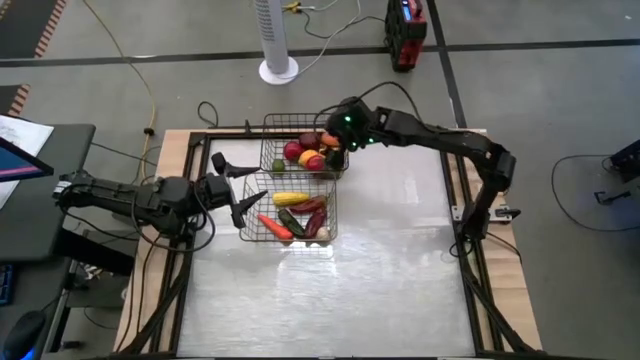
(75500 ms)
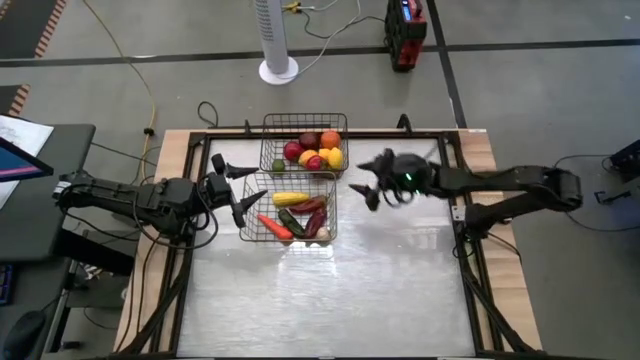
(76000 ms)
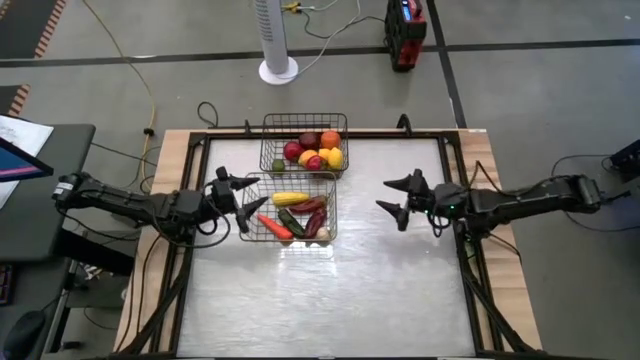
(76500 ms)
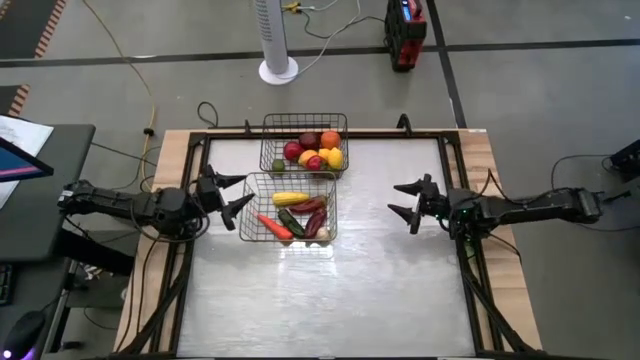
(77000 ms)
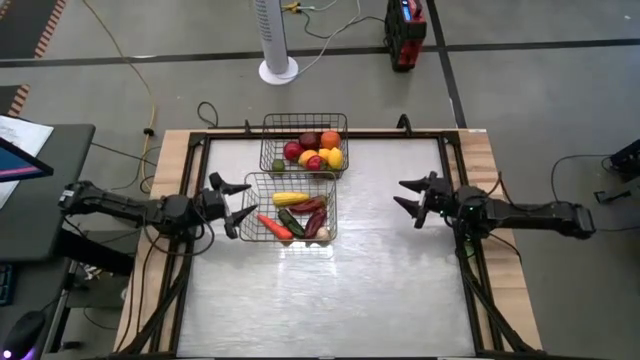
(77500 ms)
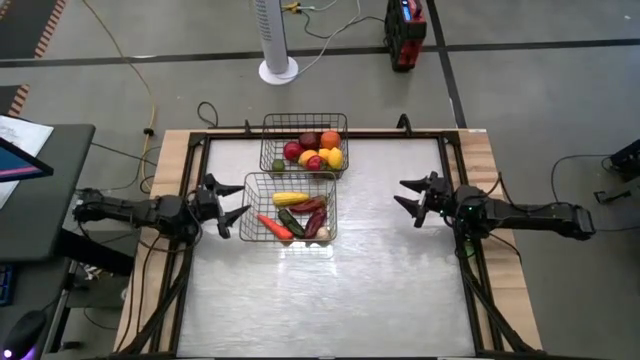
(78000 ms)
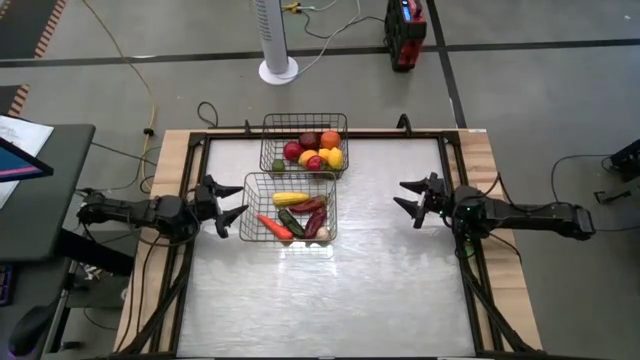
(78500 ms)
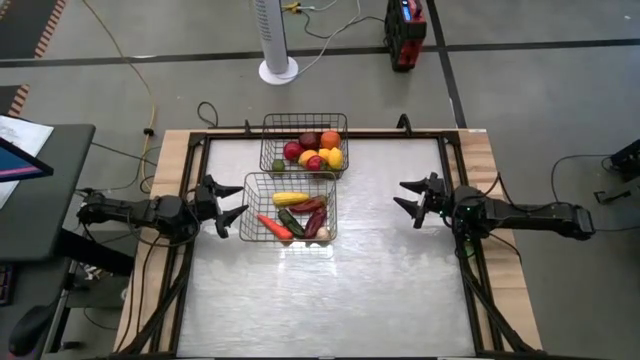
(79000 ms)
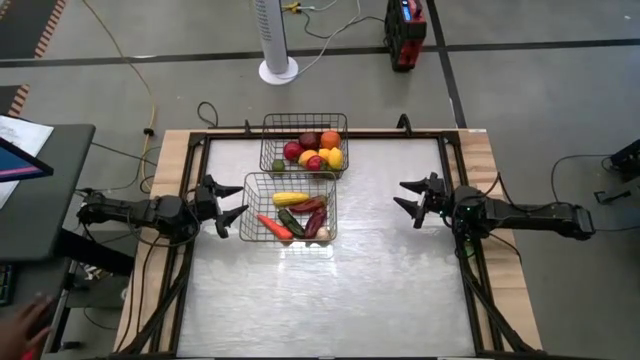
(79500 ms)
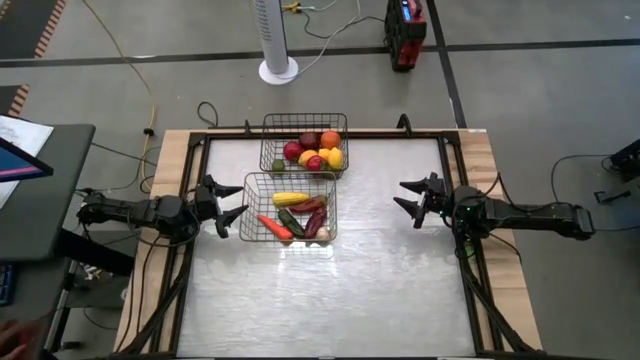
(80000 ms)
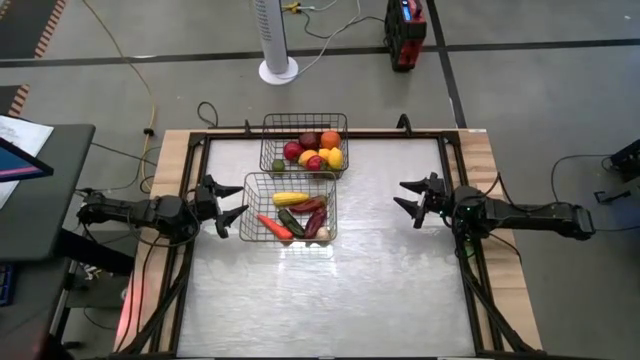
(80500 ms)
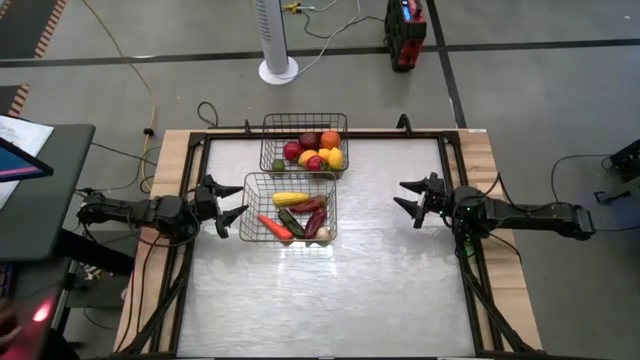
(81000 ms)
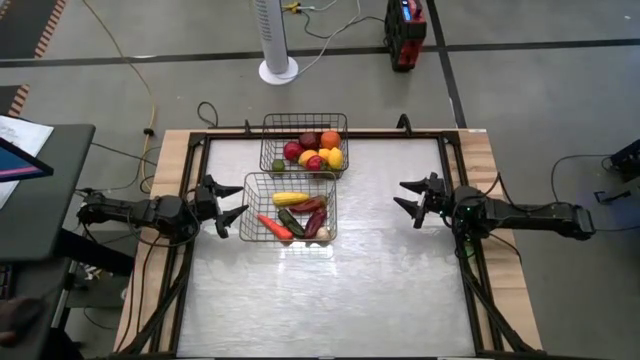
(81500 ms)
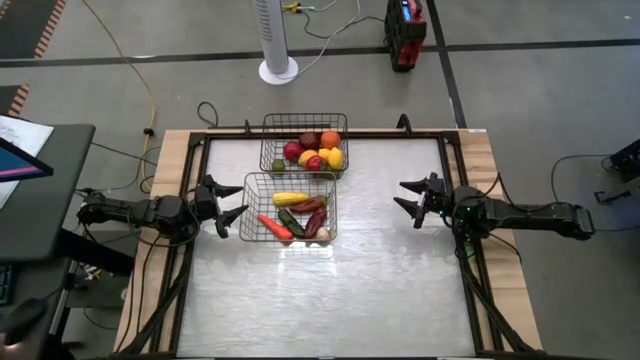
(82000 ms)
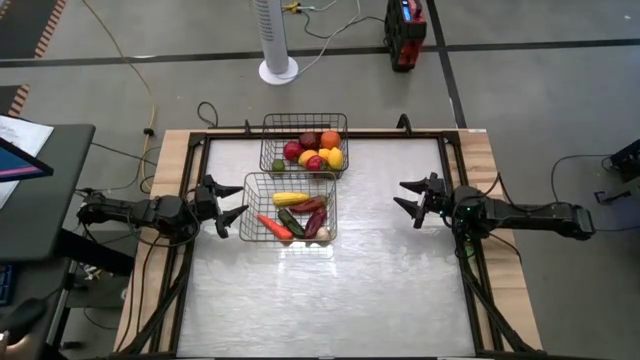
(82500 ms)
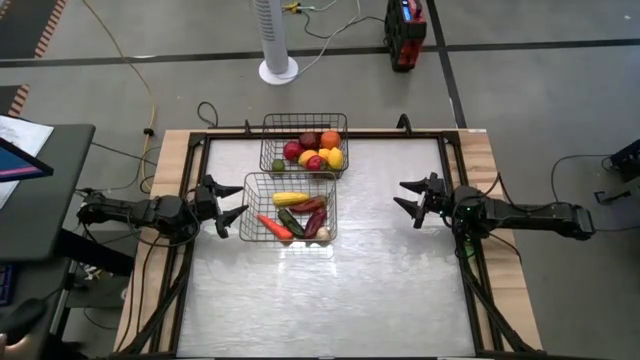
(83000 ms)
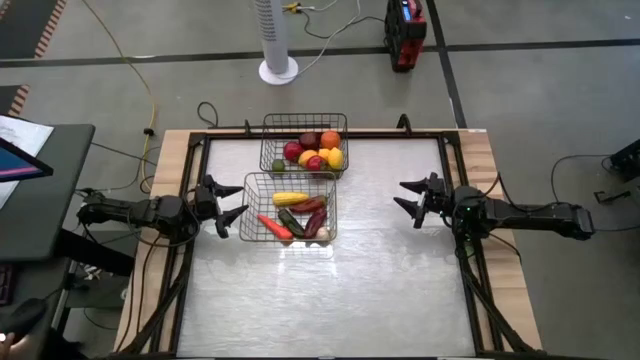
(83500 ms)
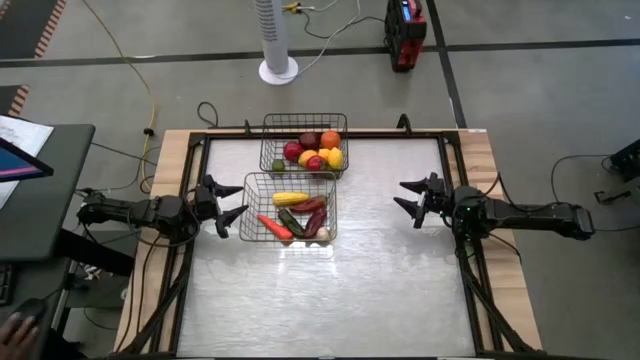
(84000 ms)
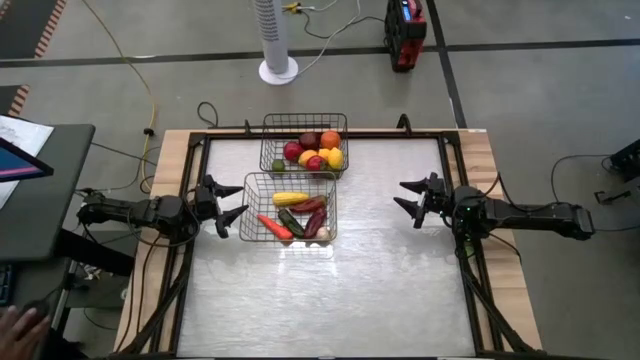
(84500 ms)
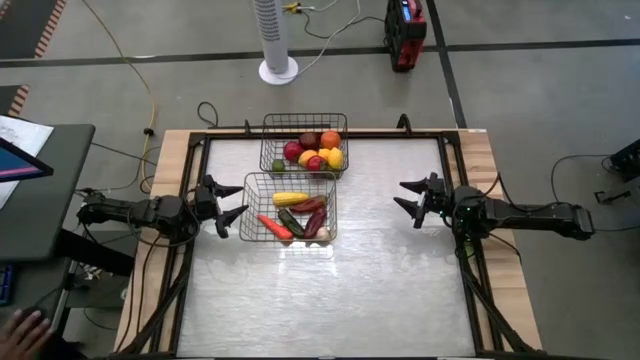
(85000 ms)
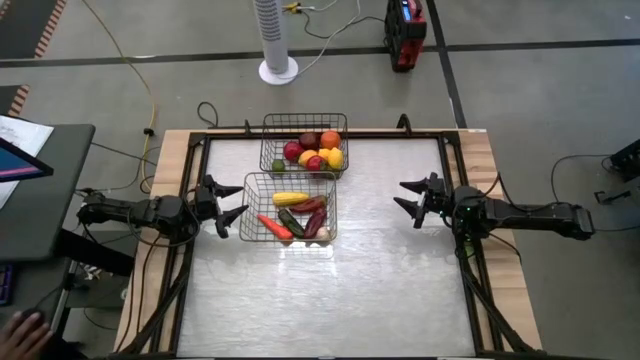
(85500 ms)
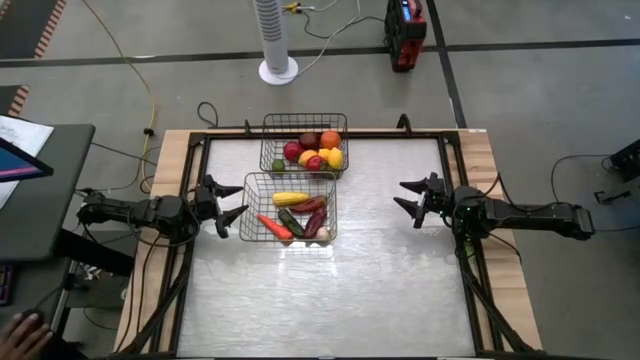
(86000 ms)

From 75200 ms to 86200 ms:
Task: Sort produce into baskets
Return to Home Position

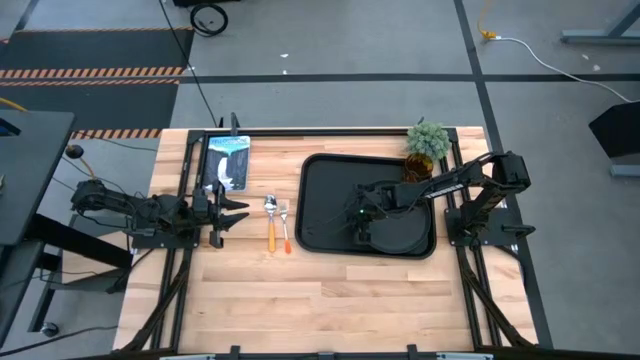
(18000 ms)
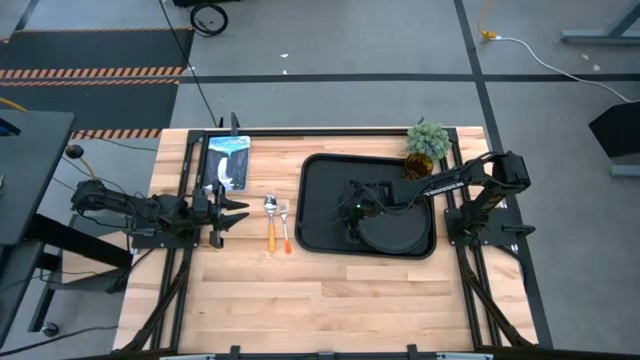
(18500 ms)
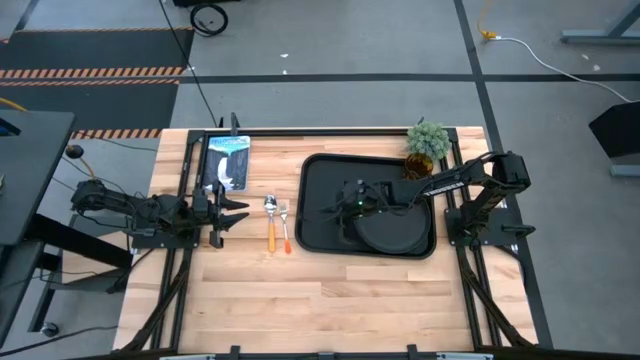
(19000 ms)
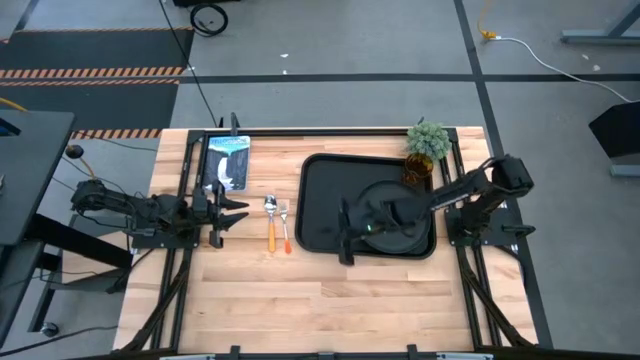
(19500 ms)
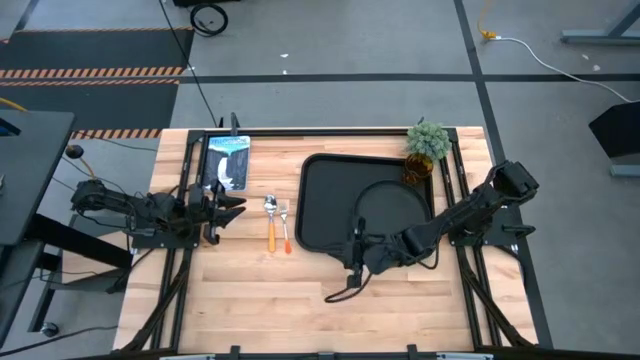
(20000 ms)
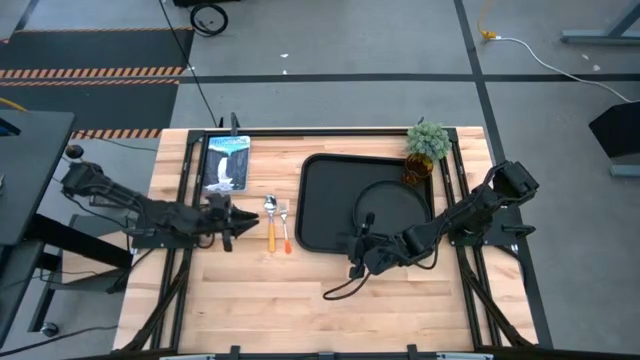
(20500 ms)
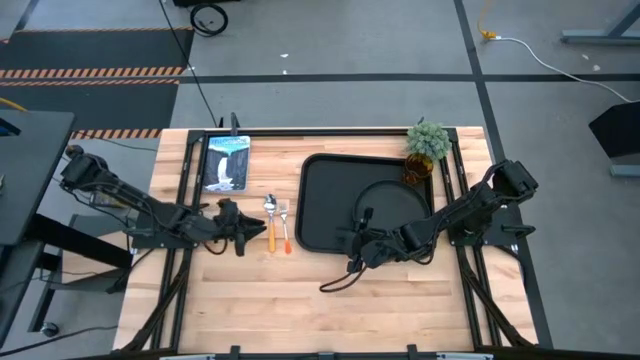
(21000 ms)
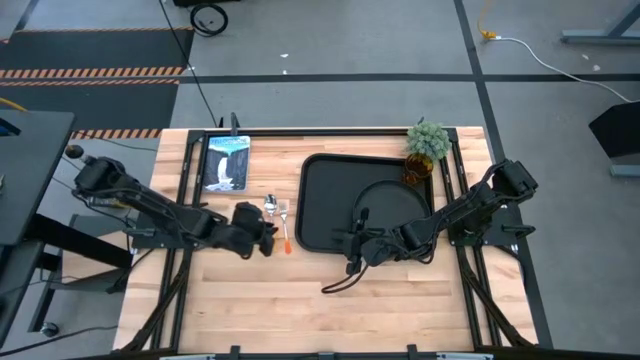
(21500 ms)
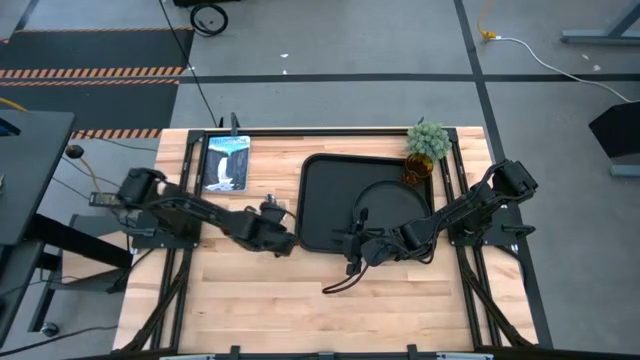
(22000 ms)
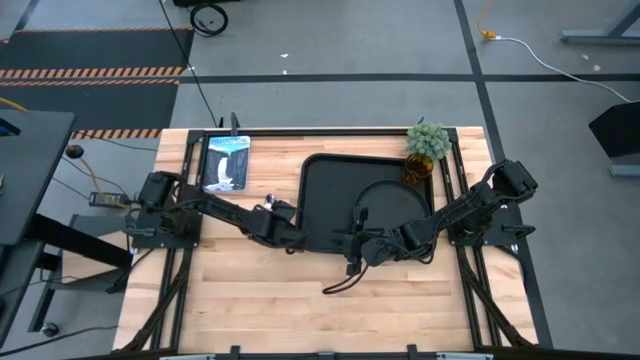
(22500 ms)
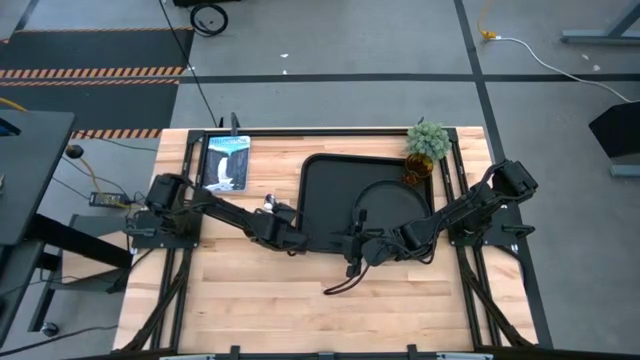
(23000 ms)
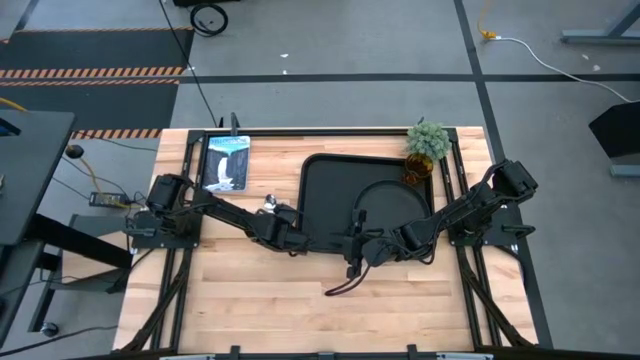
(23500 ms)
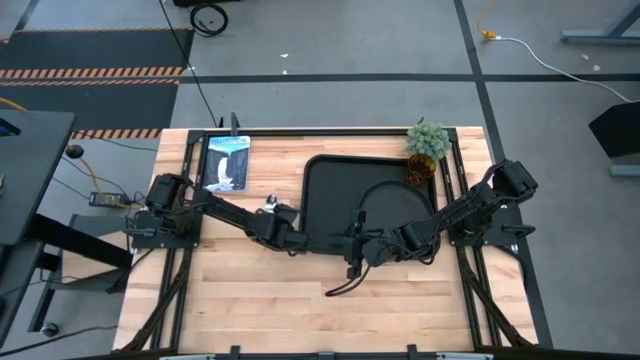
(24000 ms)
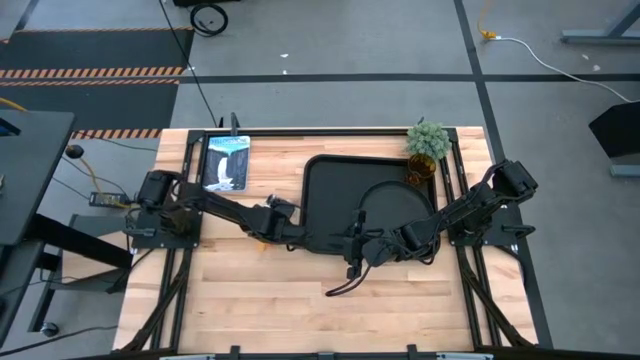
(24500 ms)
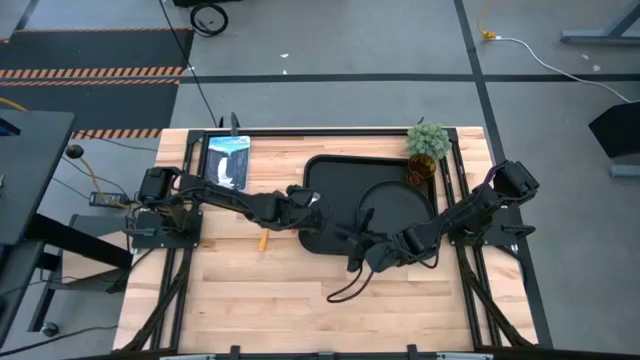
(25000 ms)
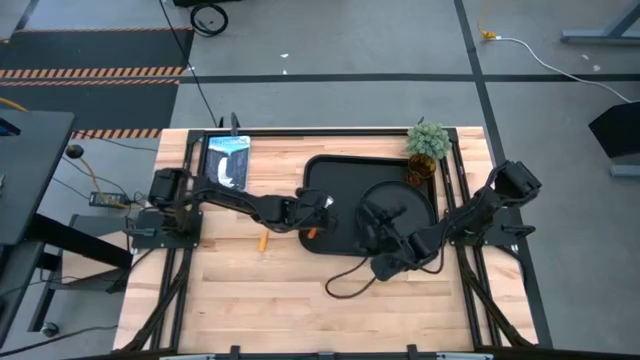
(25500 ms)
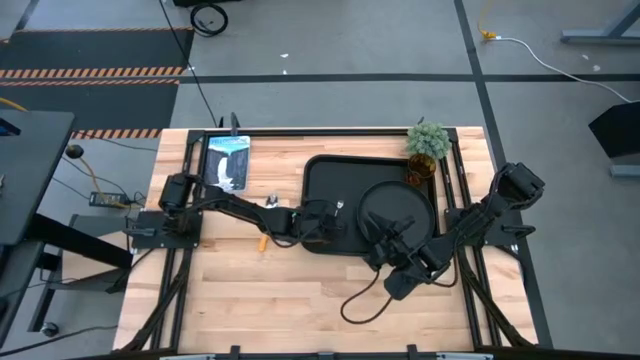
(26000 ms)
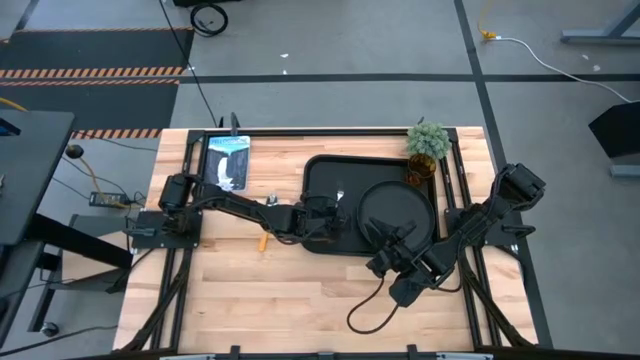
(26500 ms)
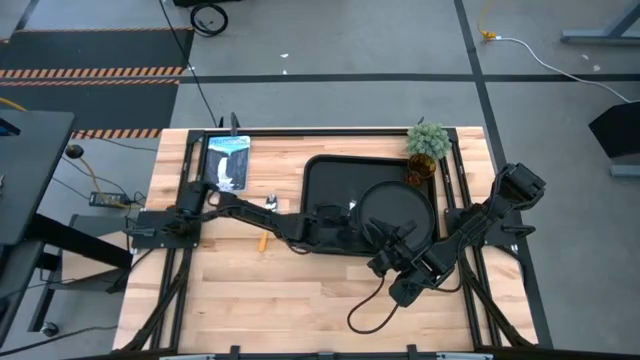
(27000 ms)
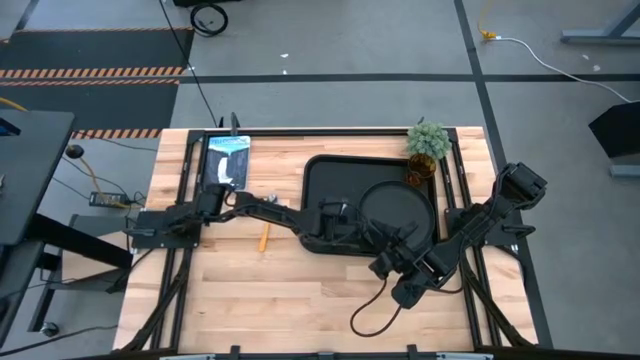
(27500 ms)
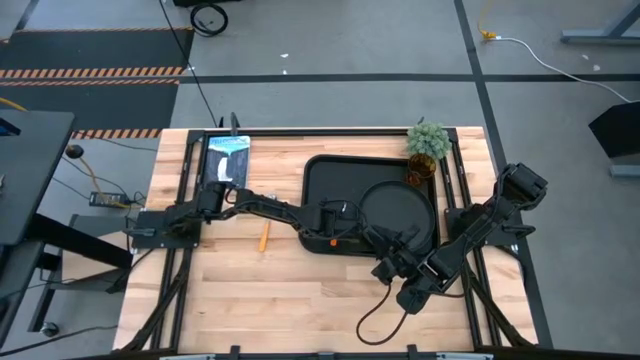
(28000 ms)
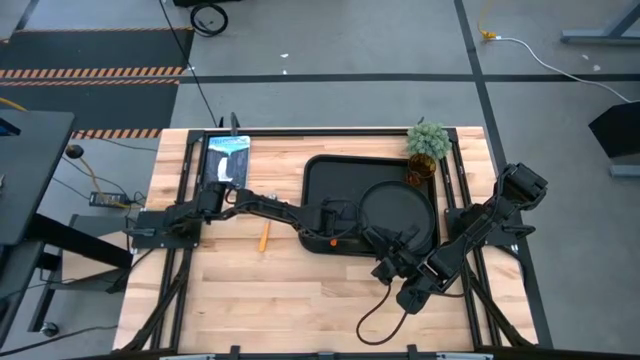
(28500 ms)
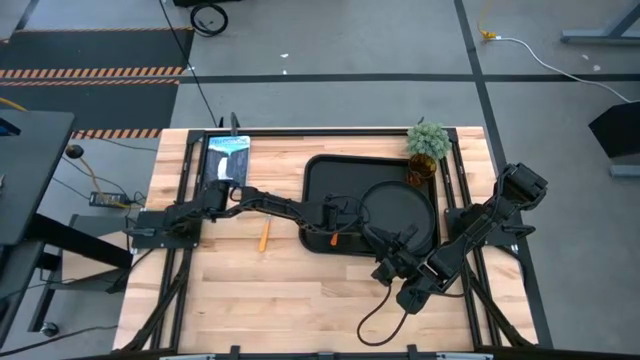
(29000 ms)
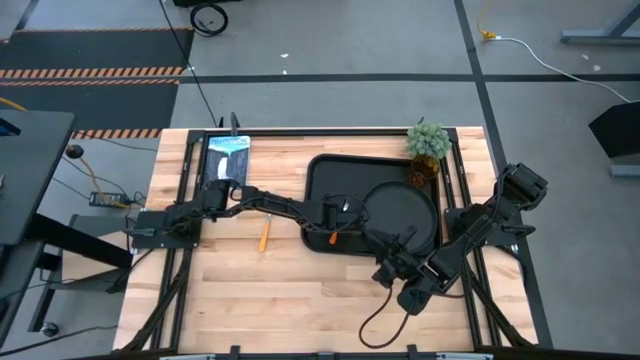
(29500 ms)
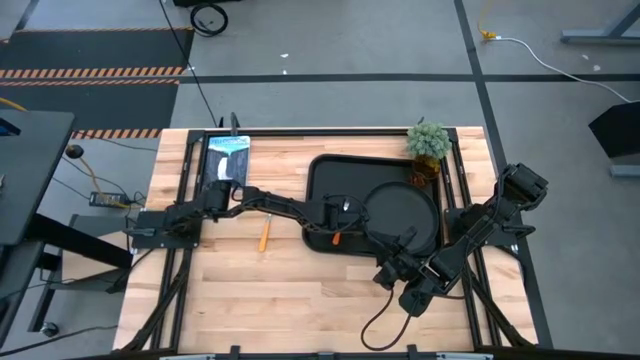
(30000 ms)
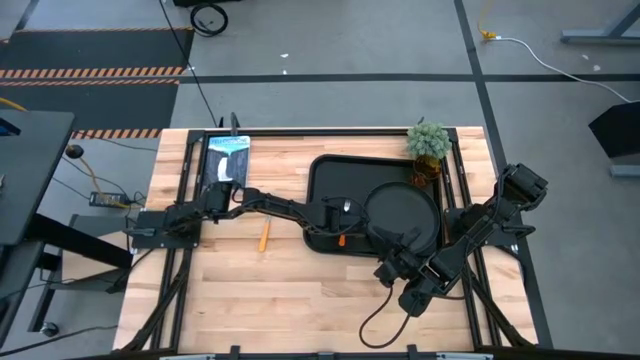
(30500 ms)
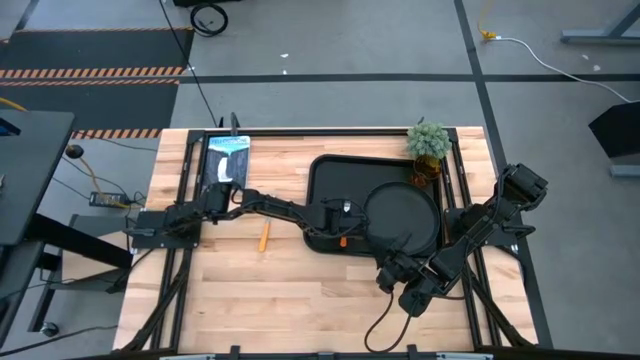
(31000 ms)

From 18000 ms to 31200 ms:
Task: Pick and place plate/cup/fork/spoon on tray
Put the orange fork to the left side of the black plate on the black tray
